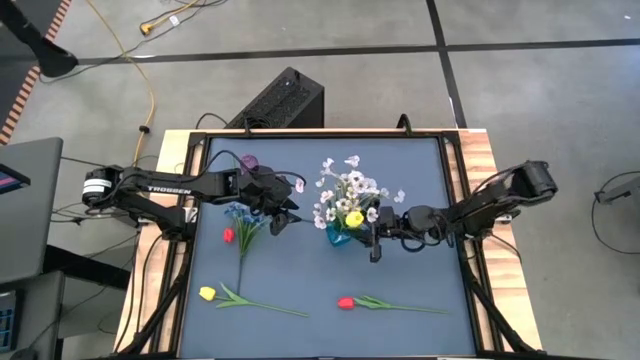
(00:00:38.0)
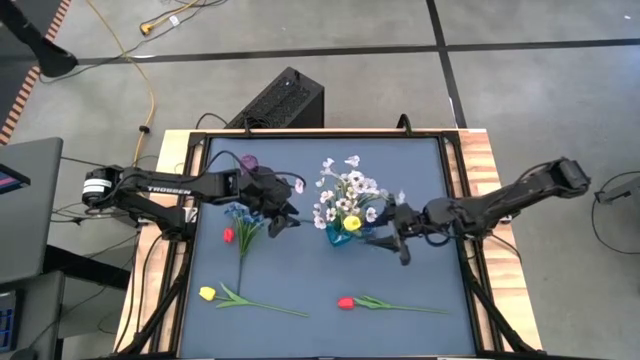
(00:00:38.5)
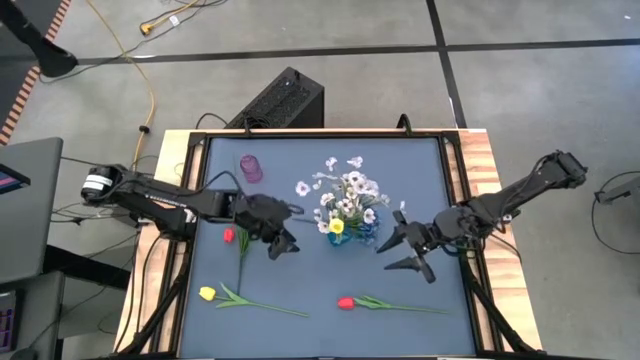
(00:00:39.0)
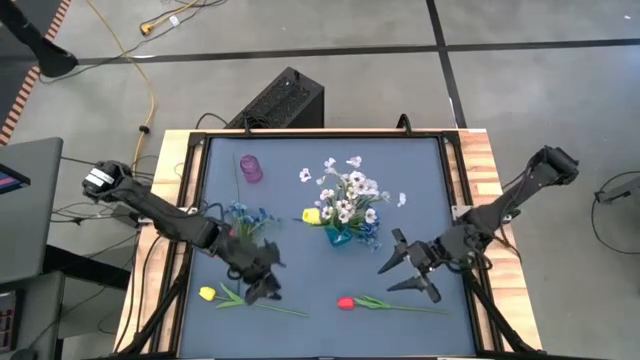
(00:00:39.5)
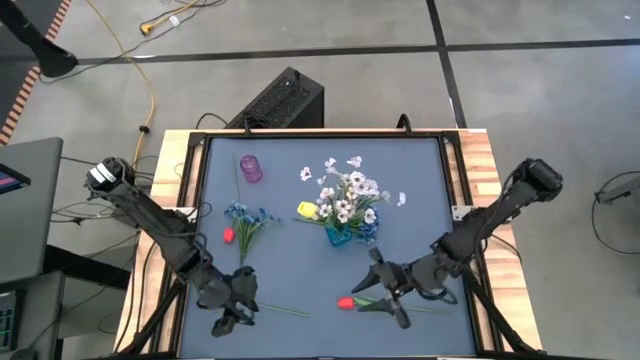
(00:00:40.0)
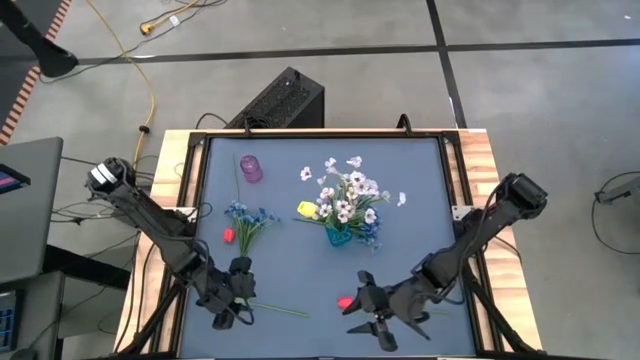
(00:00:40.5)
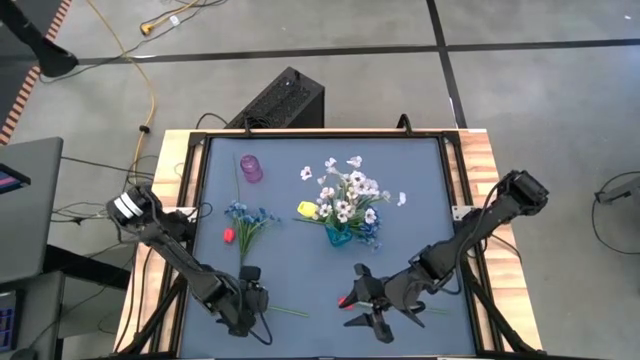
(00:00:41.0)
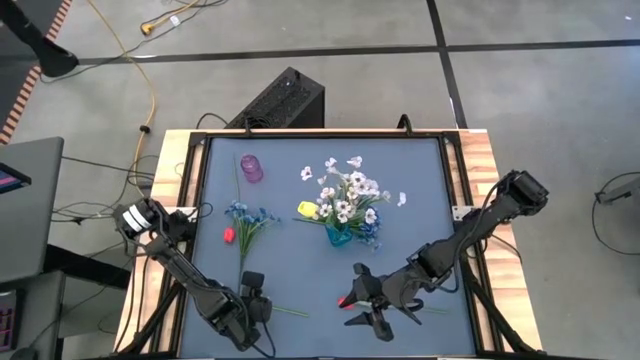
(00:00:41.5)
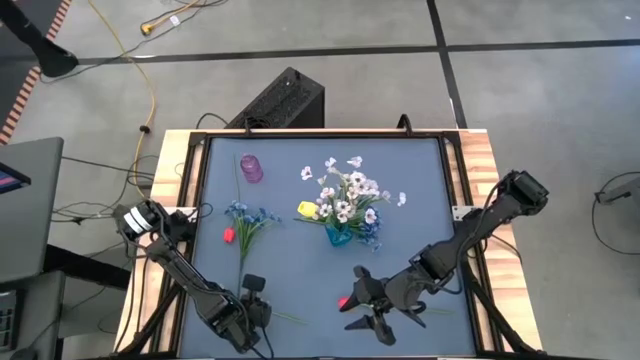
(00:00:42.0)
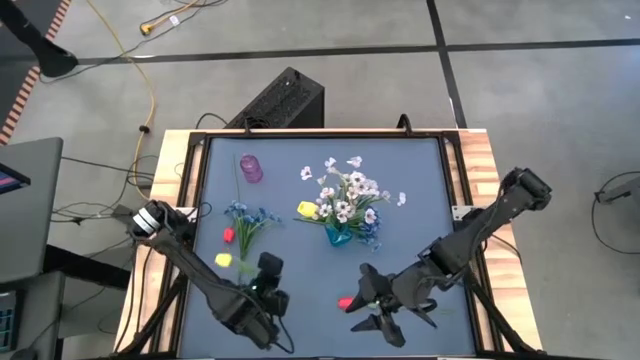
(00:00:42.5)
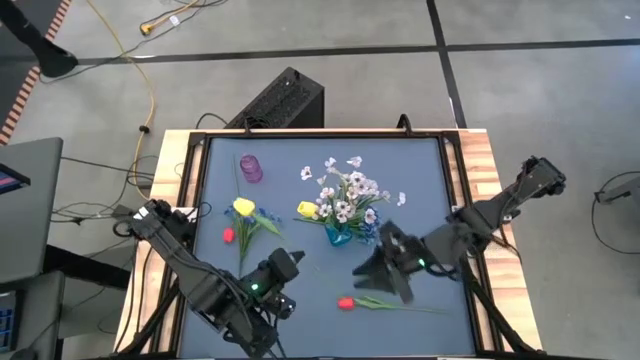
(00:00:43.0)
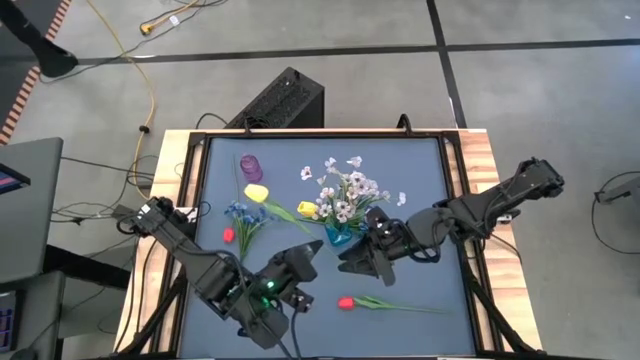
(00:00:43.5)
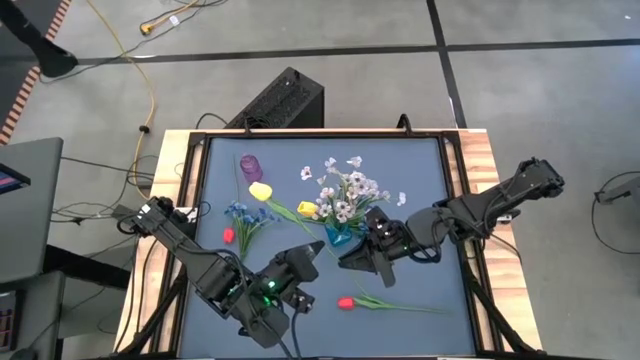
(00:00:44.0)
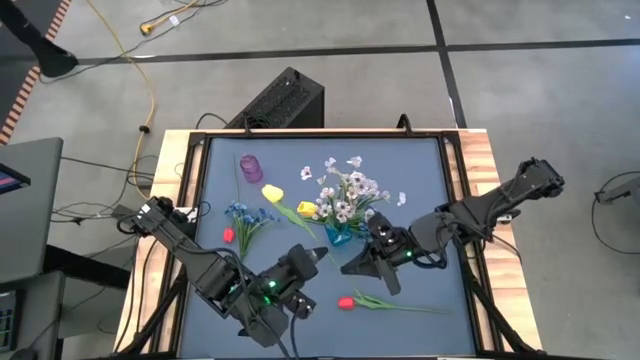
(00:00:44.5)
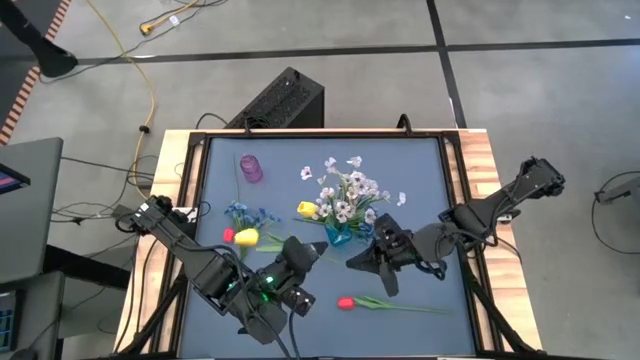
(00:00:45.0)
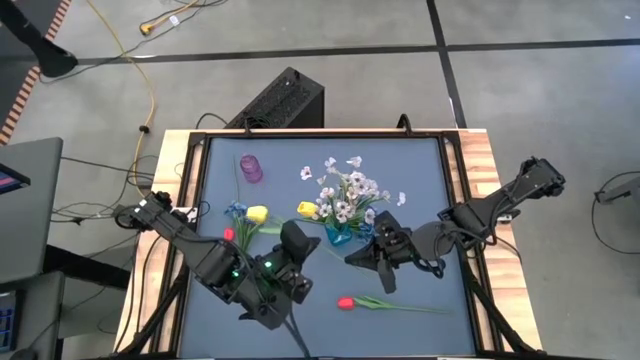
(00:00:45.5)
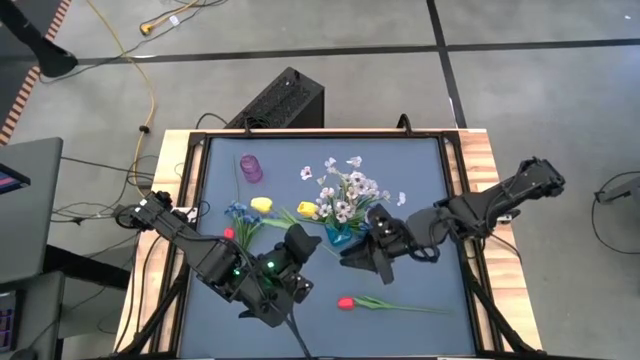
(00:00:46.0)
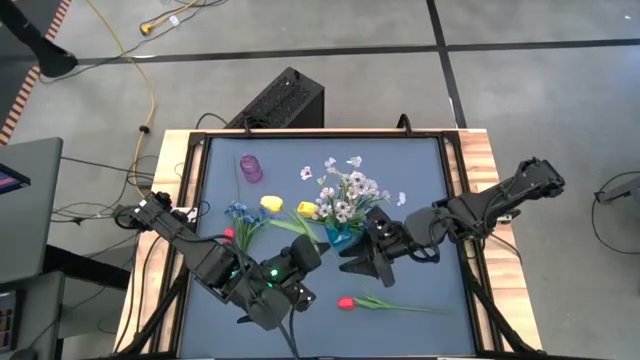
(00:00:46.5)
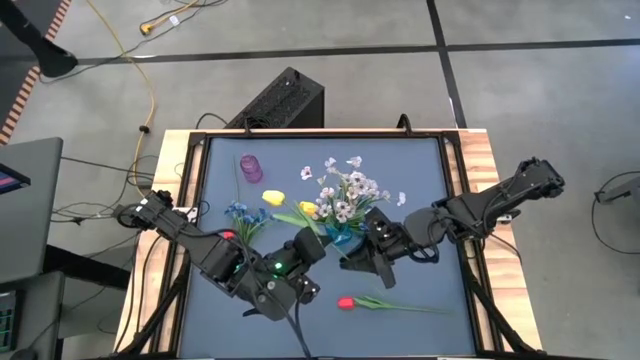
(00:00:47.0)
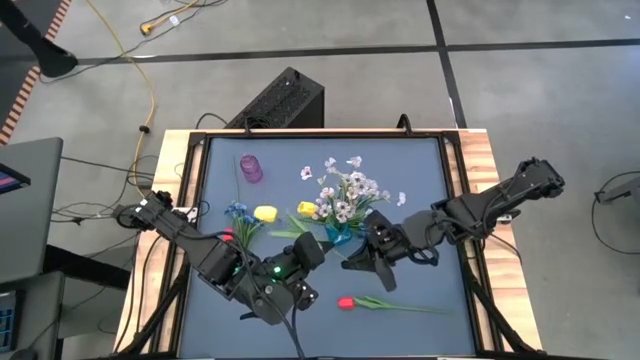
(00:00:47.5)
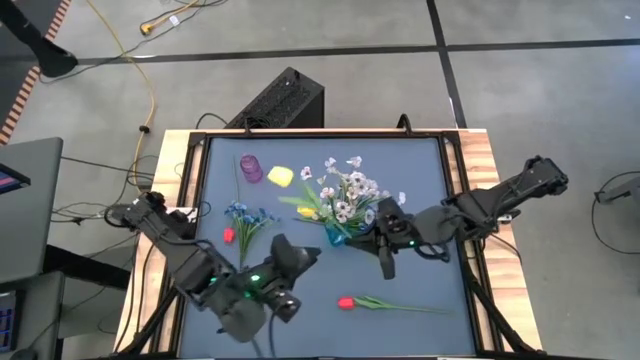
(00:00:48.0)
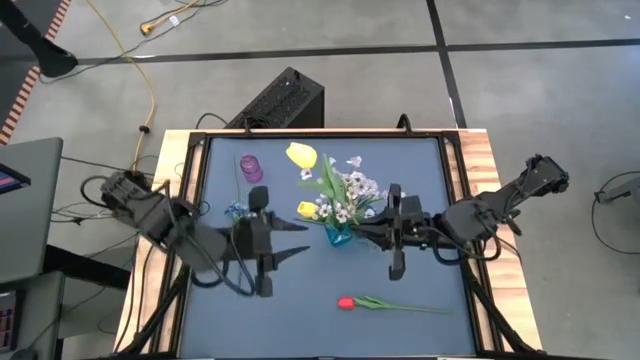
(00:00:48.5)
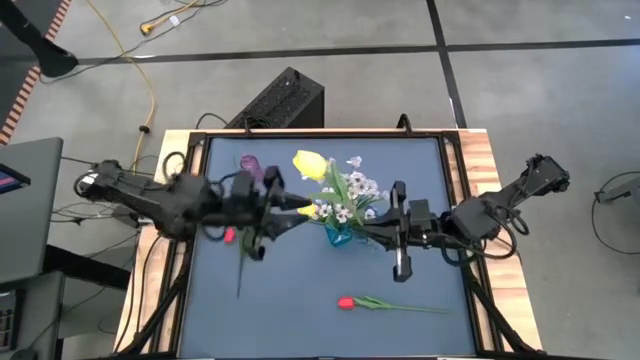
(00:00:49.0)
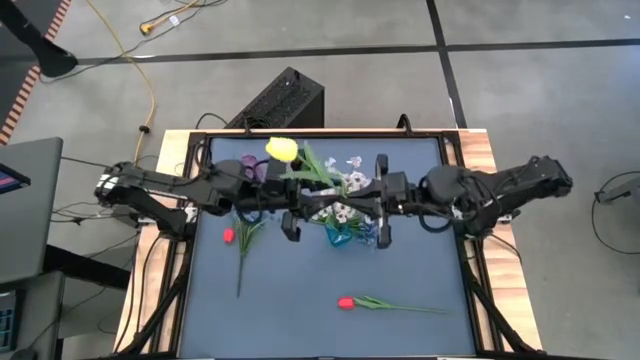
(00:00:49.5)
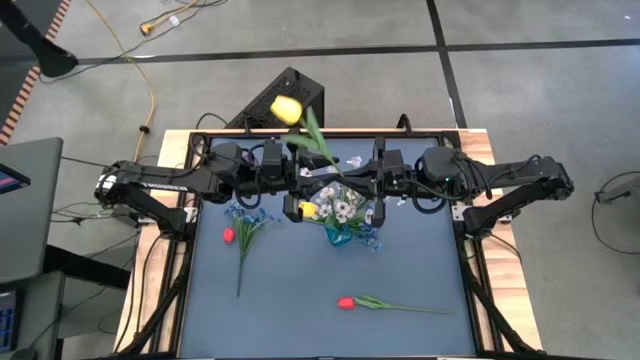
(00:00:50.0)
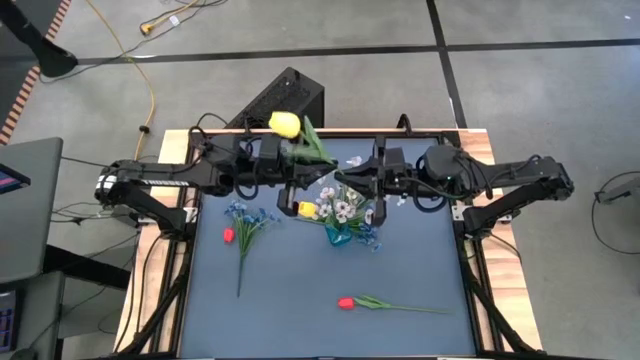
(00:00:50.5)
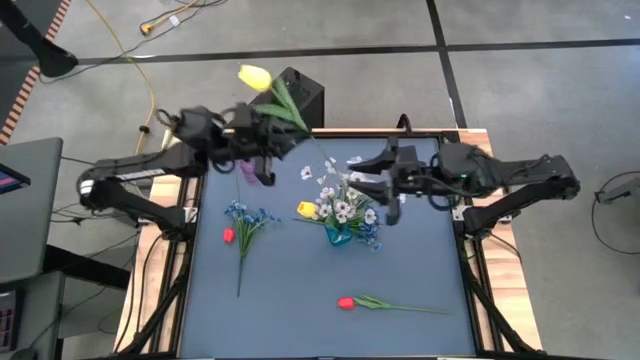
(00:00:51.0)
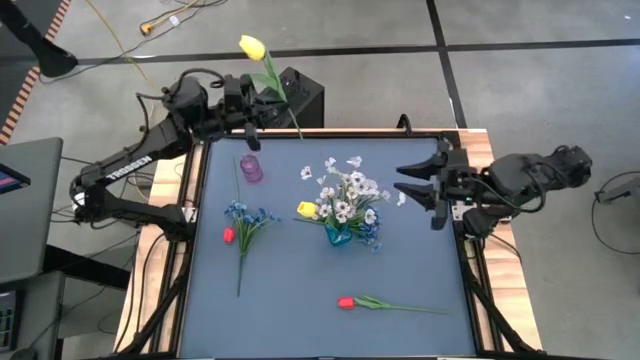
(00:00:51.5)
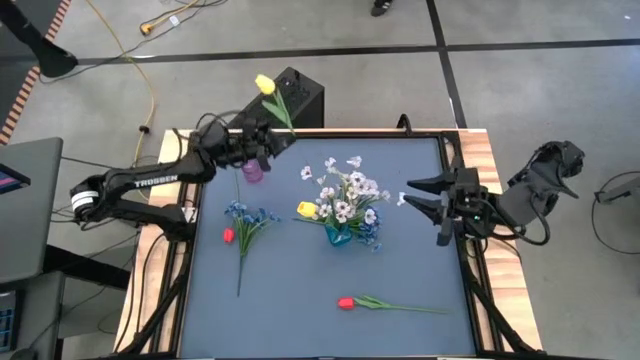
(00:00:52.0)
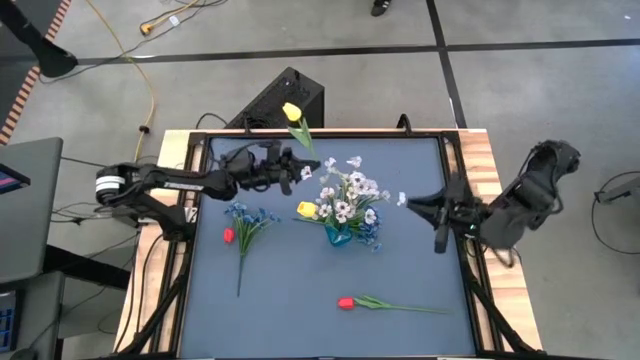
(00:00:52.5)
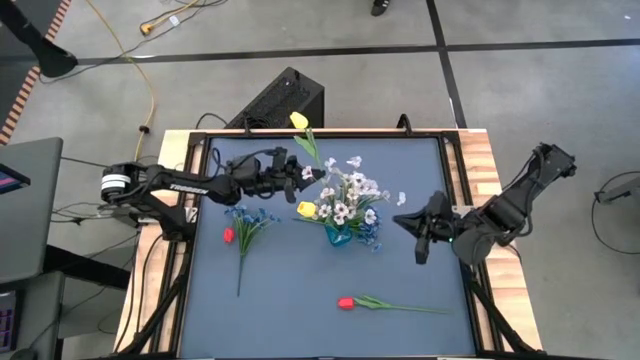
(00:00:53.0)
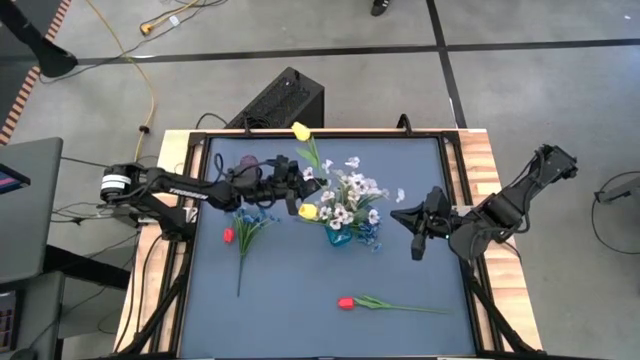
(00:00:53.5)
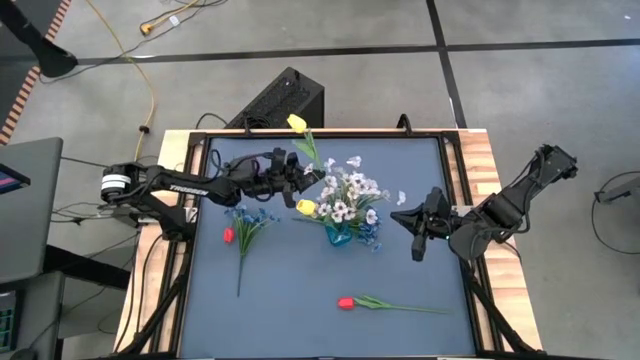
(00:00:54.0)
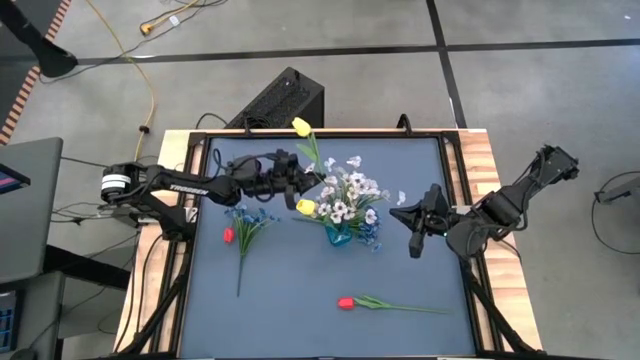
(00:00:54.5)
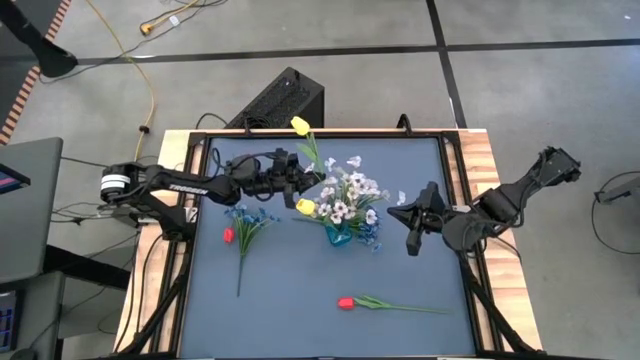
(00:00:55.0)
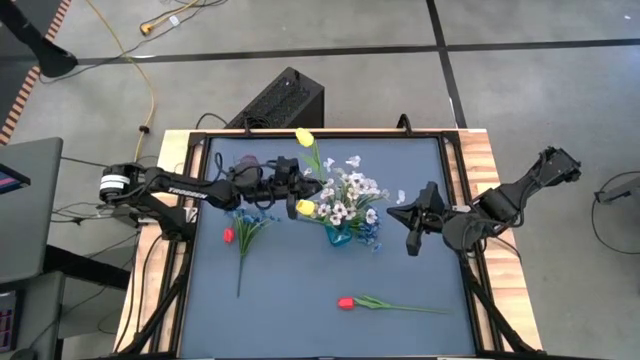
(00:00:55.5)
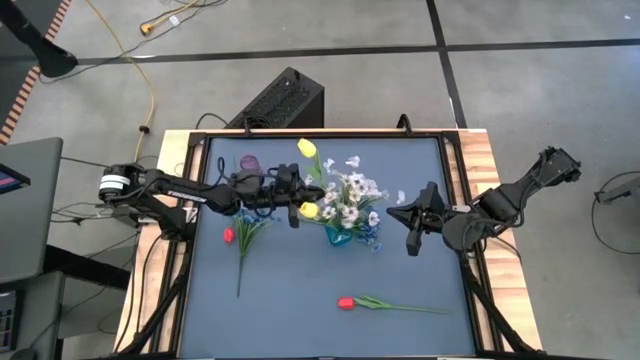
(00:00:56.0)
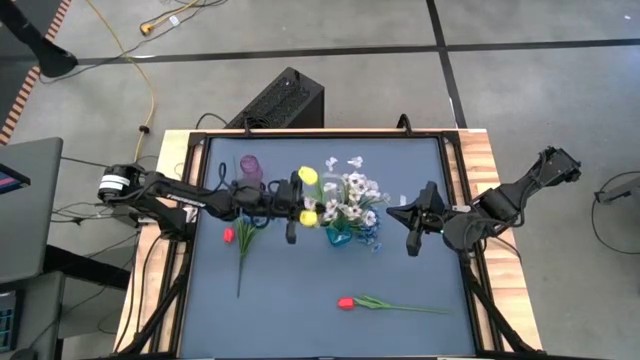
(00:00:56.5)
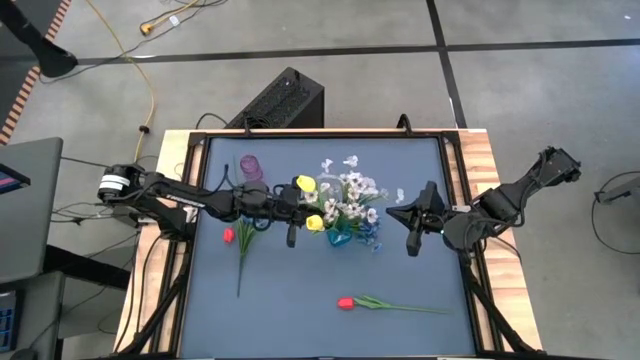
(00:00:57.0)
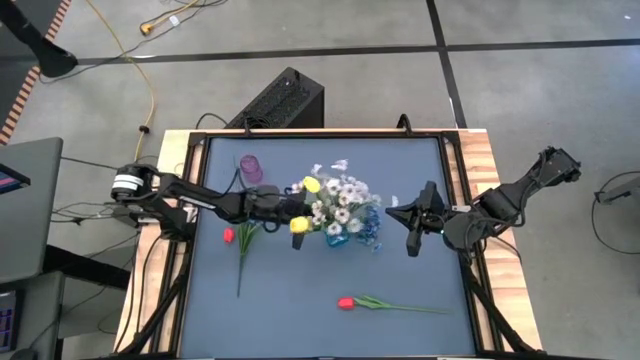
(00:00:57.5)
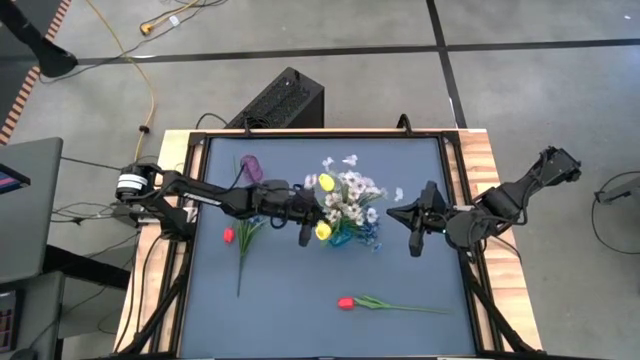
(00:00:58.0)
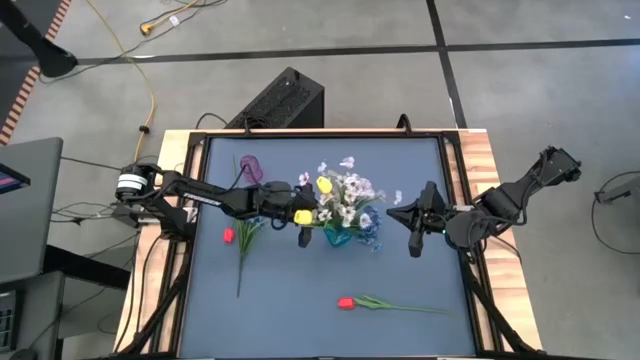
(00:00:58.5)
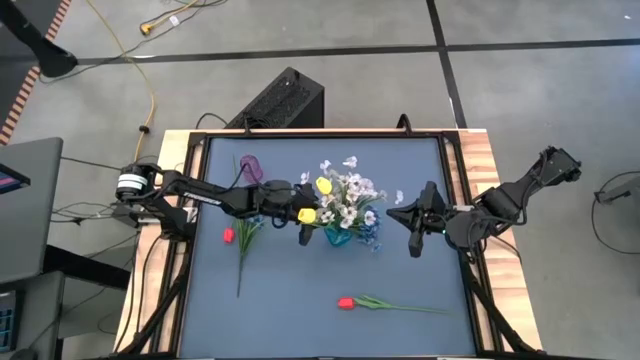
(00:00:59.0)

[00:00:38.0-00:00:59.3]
Task: Sort flowers into vase by color
Put the bottom yellow flower into the blue vase
